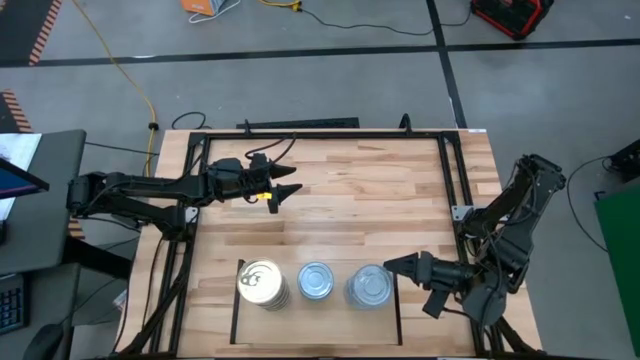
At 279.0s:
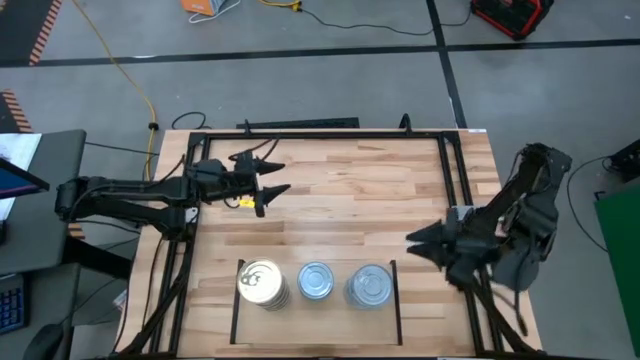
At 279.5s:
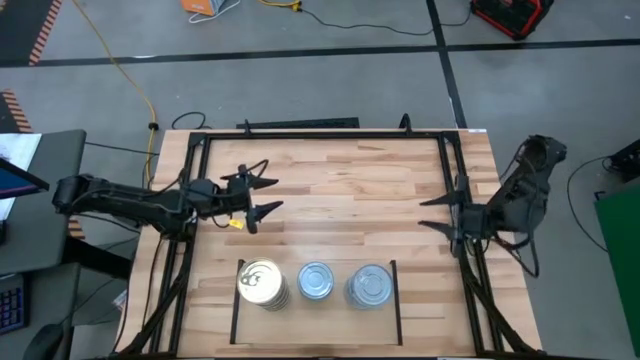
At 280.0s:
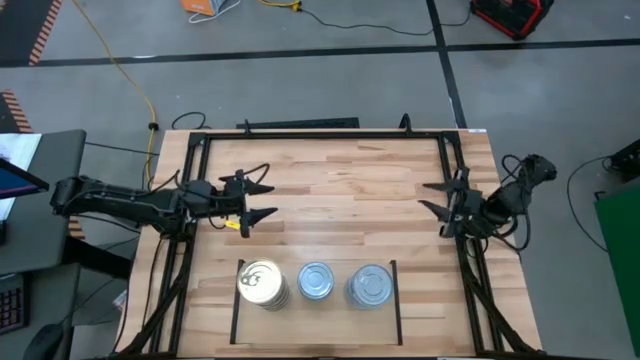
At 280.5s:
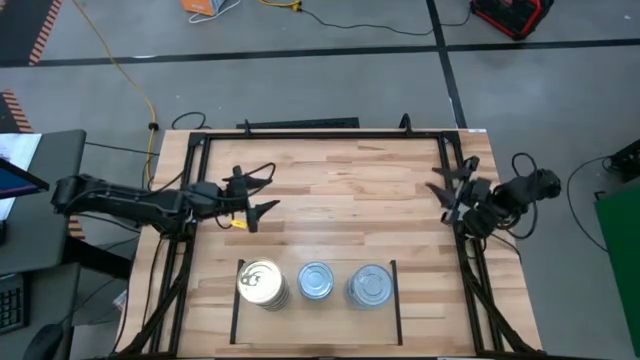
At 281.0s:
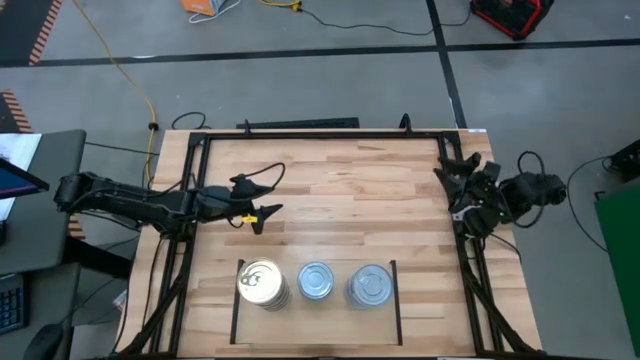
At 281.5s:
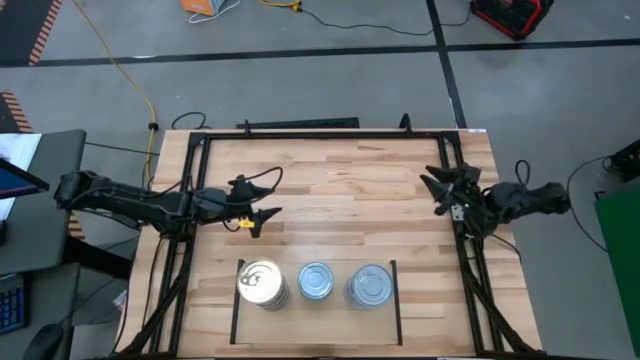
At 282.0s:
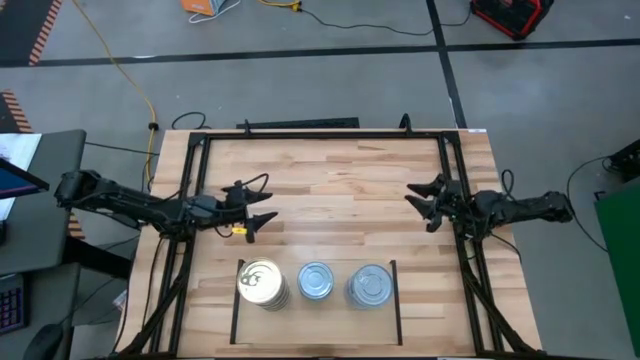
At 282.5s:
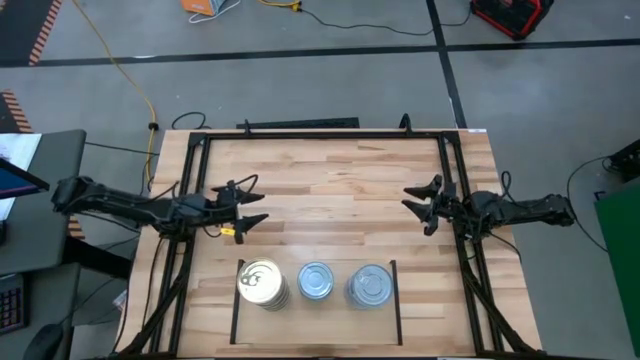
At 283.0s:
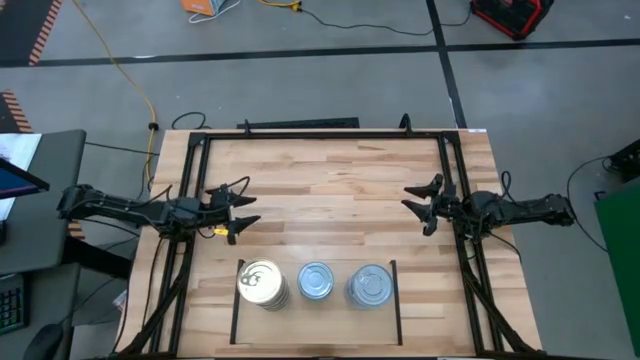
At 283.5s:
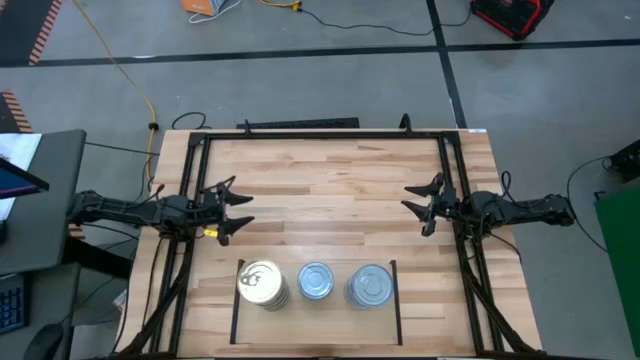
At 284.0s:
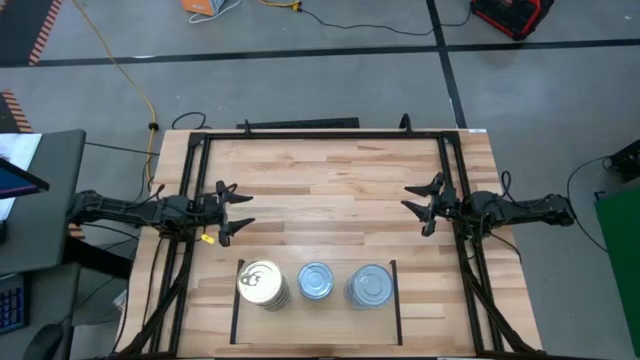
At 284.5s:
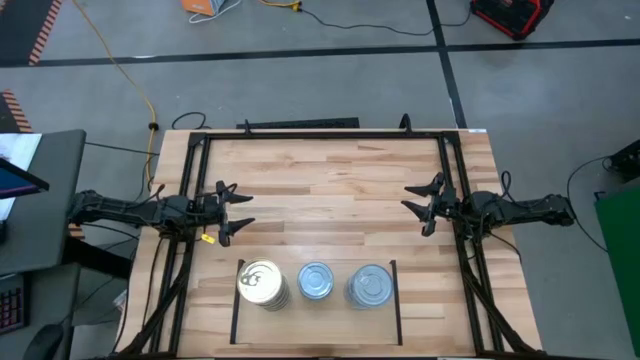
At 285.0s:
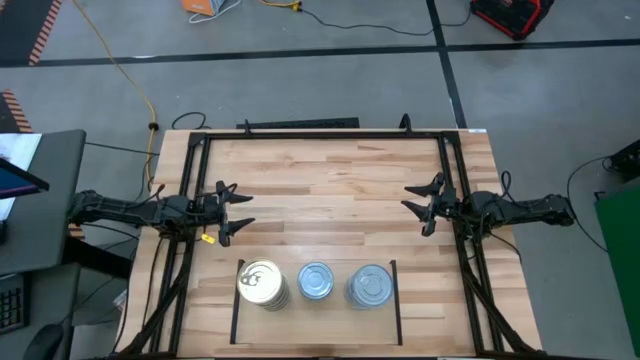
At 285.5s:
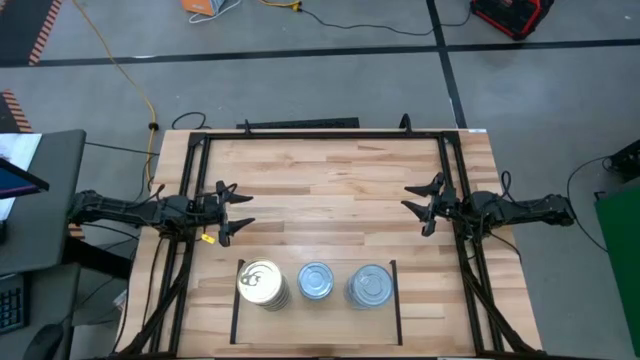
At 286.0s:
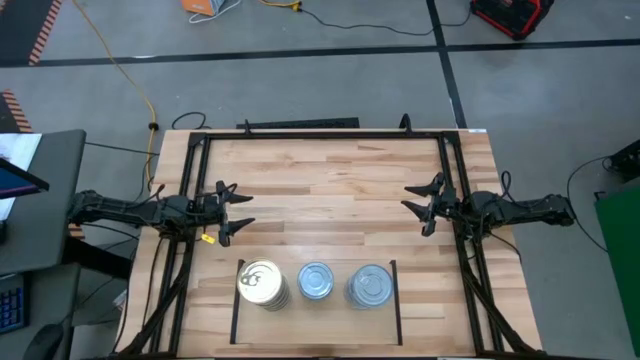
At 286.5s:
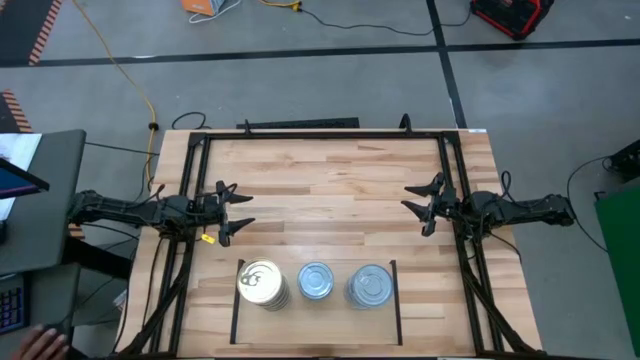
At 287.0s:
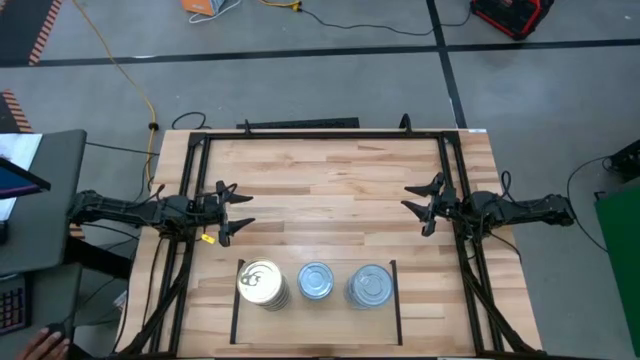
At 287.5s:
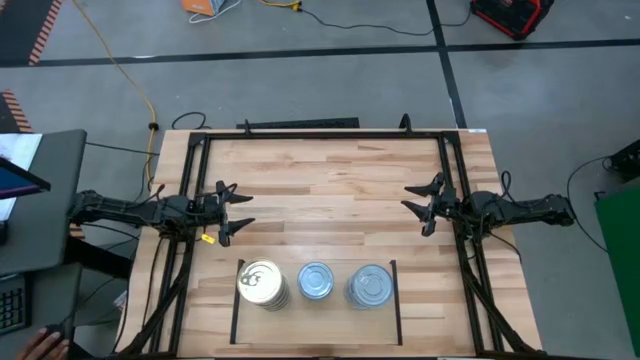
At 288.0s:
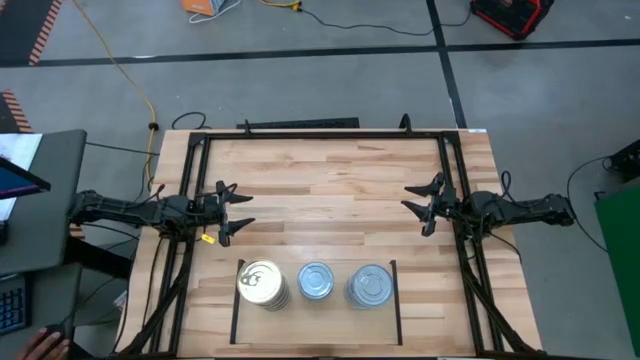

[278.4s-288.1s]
Task: Stack canned seafood by type on shelf
Return to Home Position

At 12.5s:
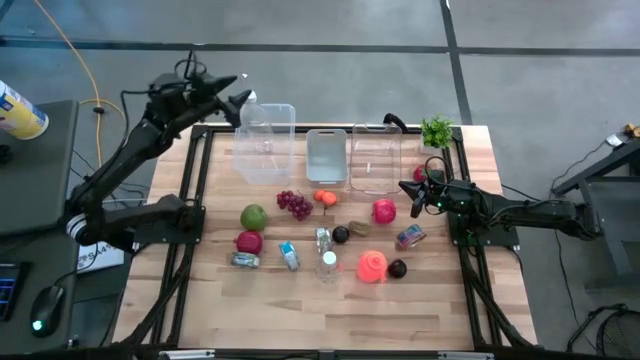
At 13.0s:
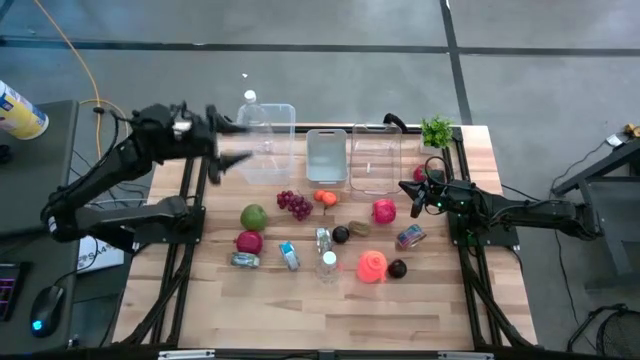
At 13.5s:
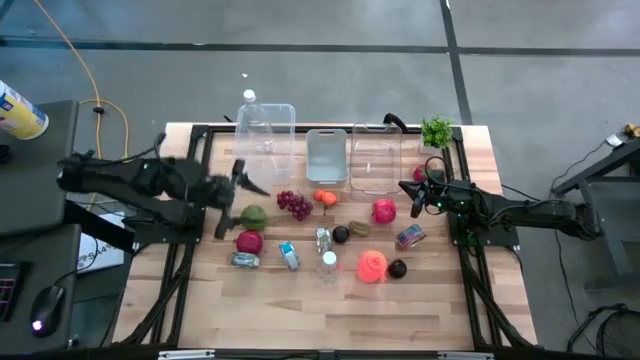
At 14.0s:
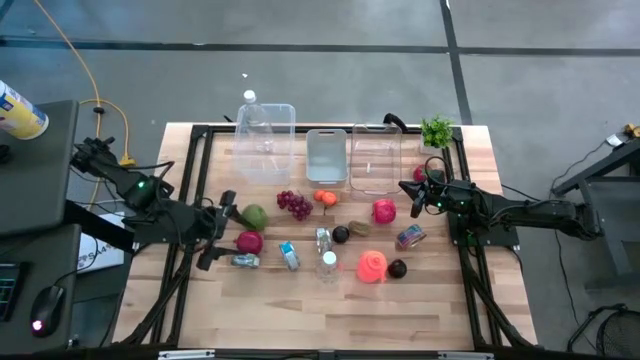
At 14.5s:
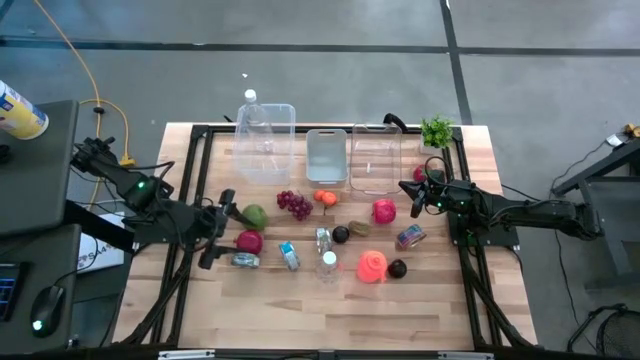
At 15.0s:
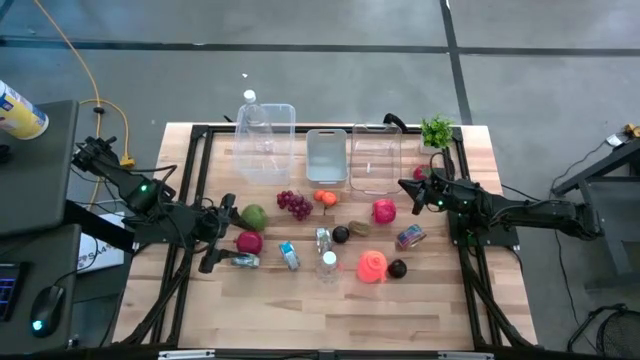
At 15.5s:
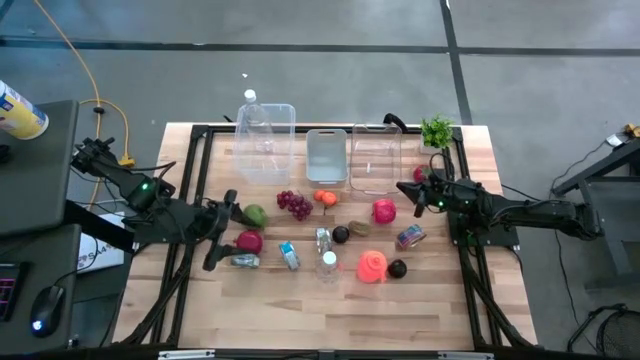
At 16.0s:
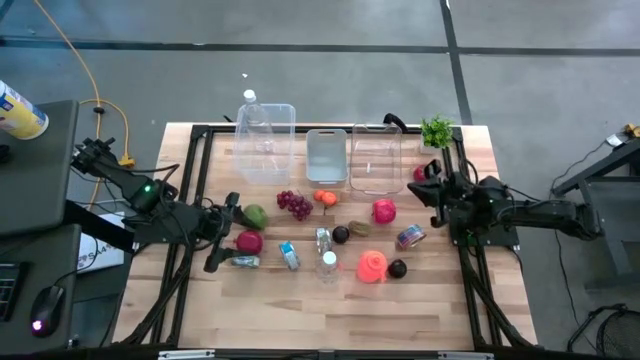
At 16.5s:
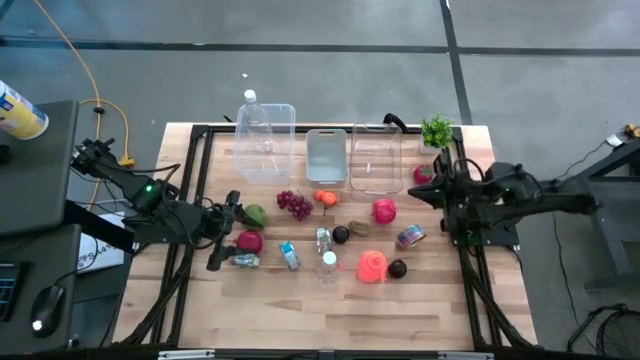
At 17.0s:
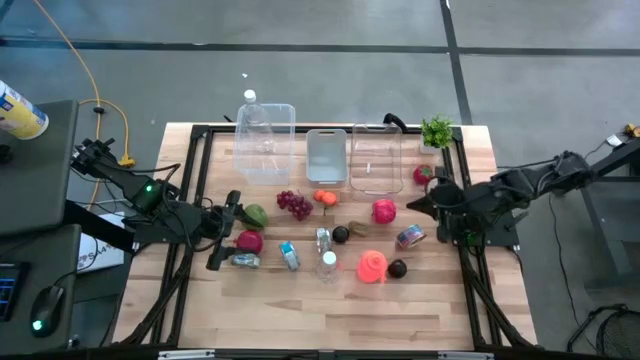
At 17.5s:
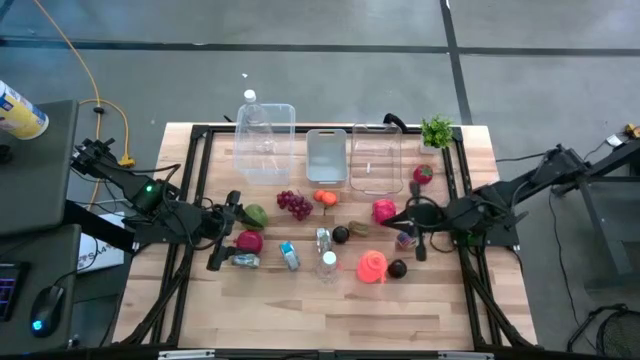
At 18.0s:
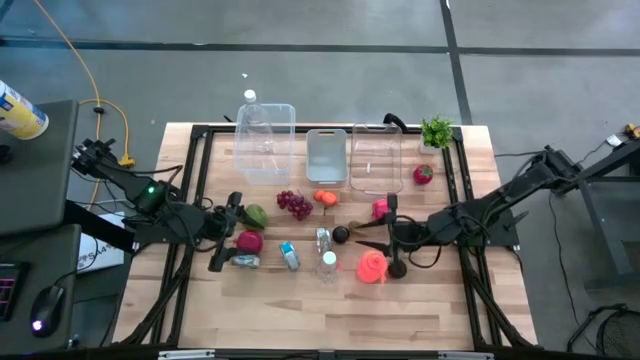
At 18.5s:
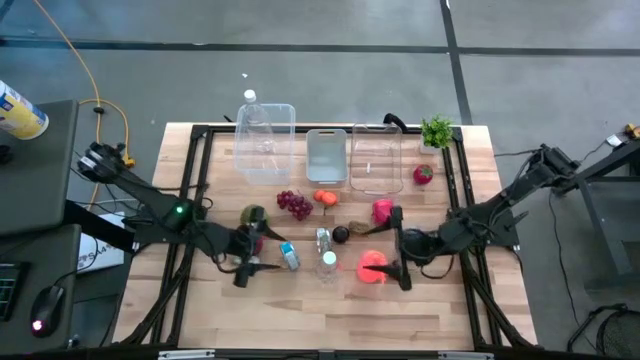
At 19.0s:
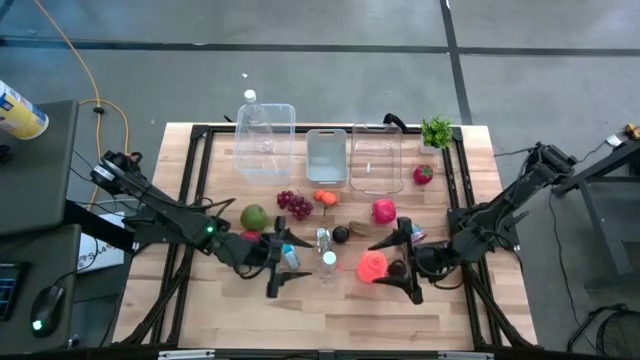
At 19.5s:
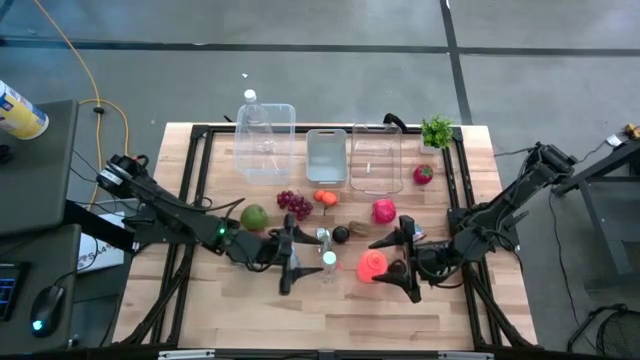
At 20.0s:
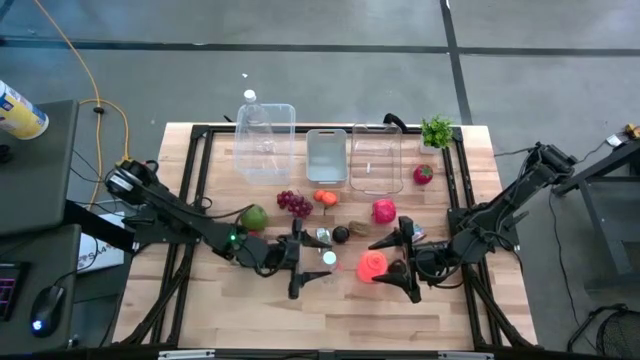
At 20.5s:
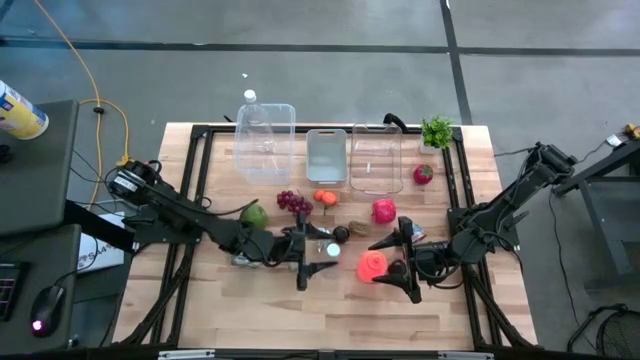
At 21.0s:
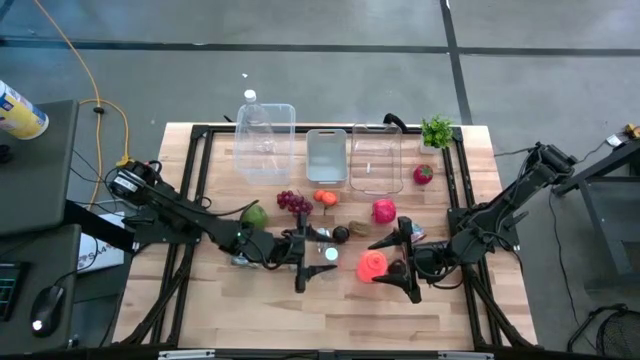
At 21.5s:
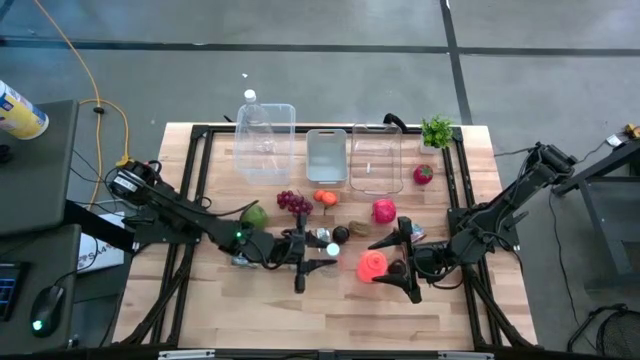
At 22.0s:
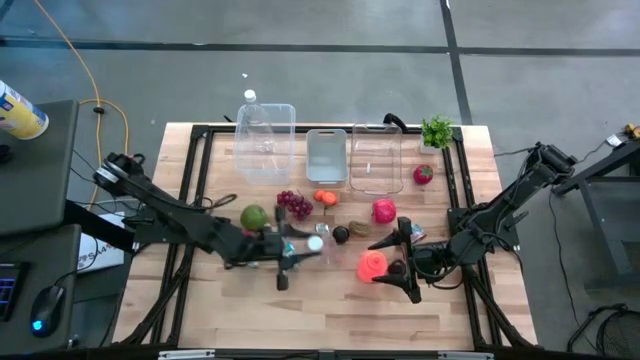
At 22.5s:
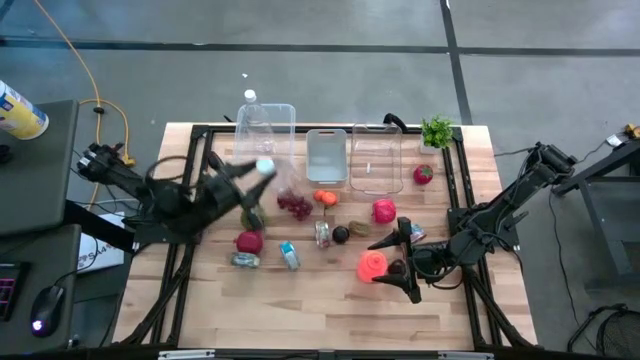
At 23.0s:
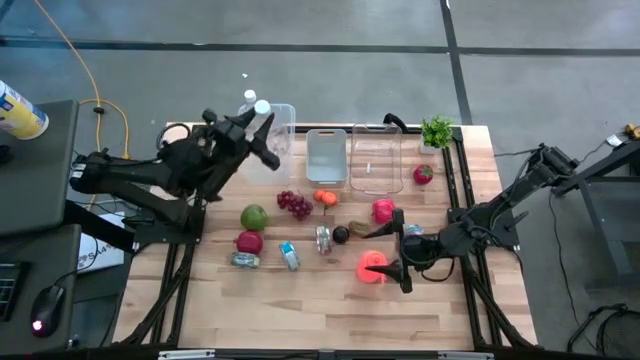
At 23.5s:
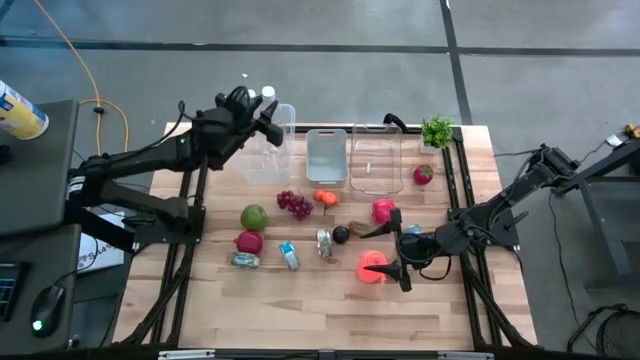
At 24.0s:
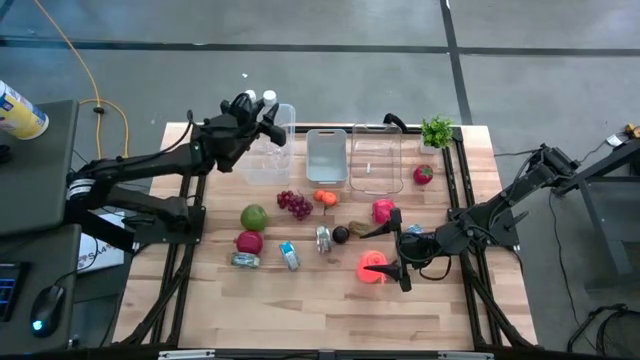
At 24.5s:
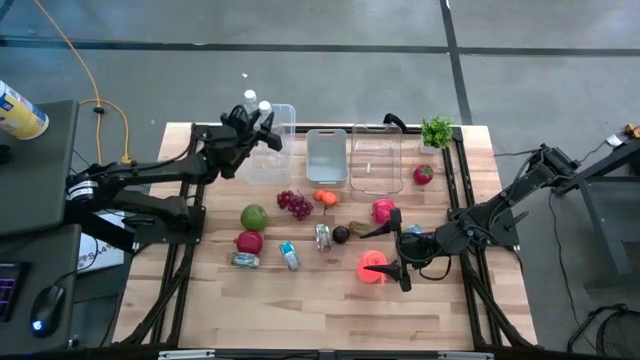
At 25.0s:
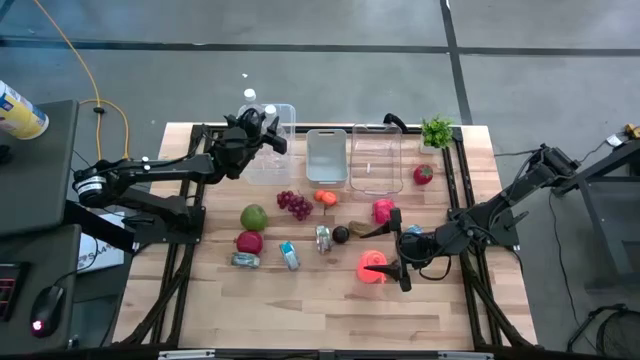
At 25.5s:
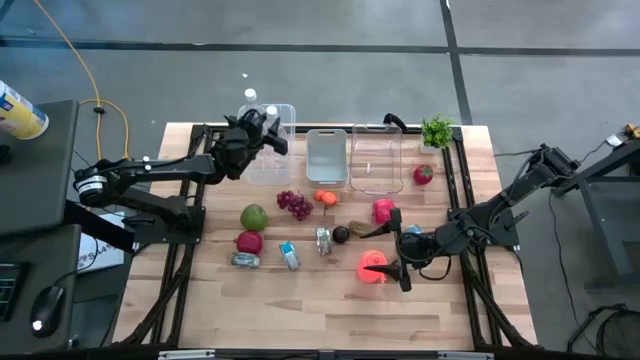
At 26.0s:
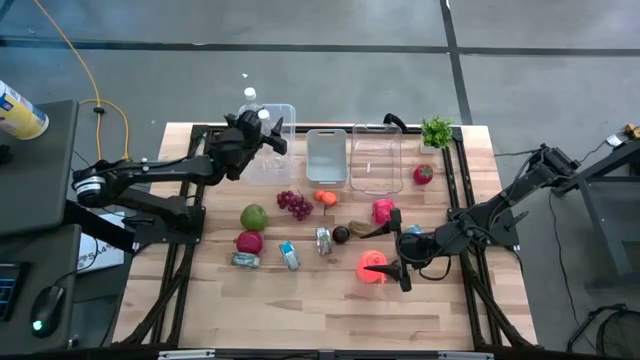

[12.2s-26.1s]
Task: Pick & Place Food Item
Put the transparent bottle into the white bin
